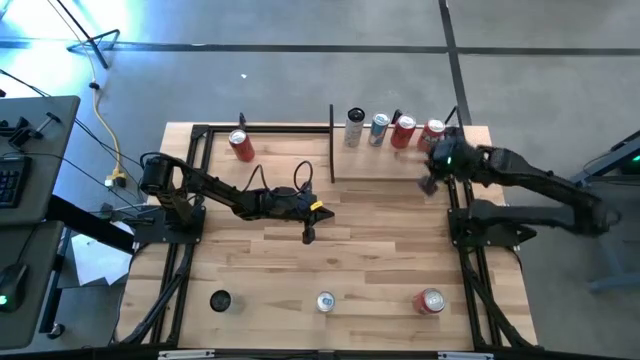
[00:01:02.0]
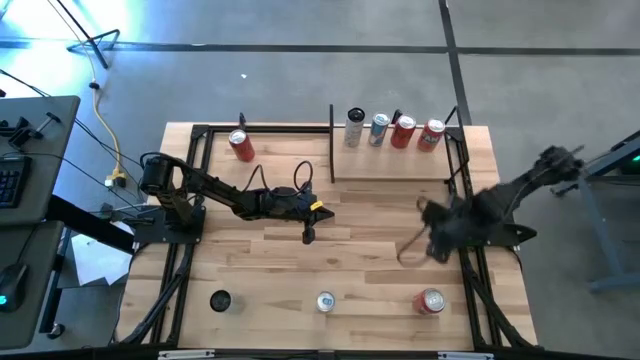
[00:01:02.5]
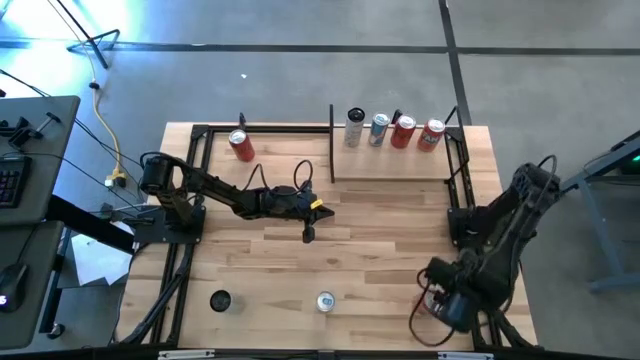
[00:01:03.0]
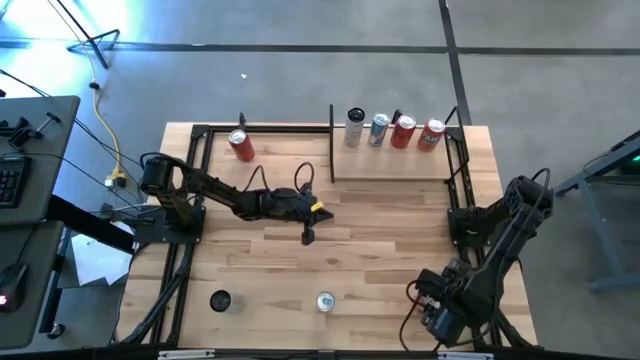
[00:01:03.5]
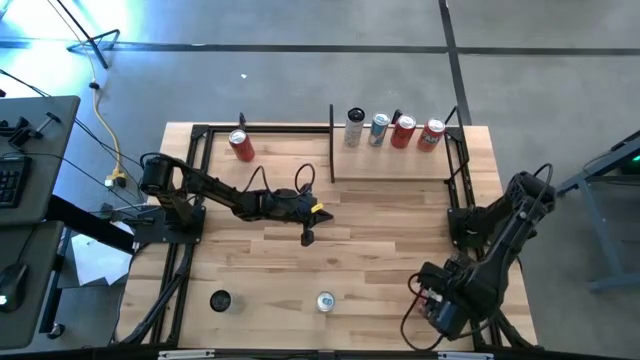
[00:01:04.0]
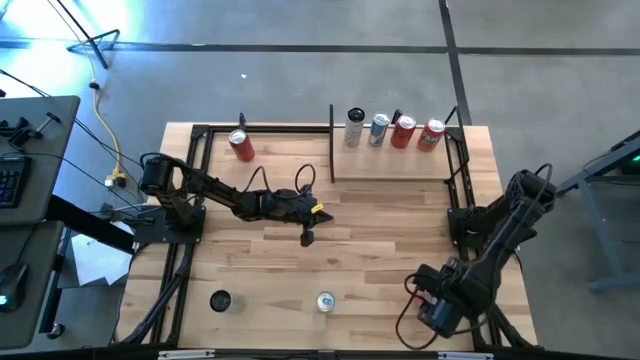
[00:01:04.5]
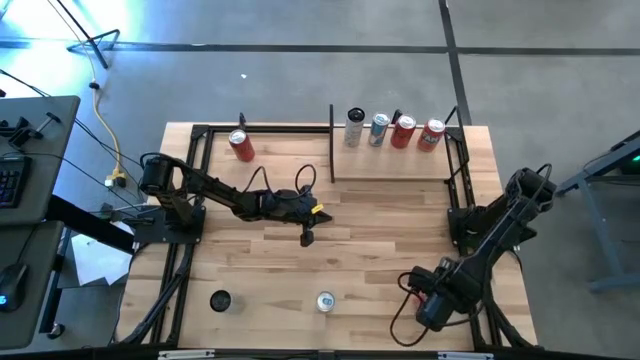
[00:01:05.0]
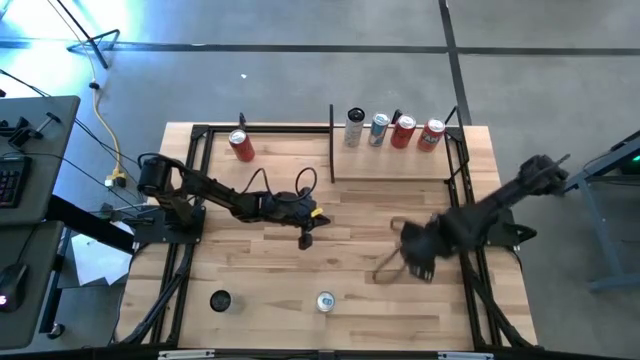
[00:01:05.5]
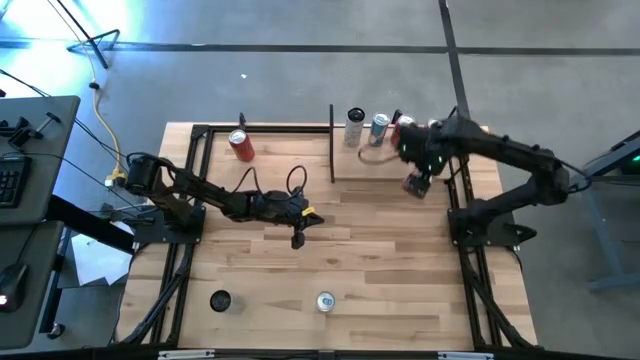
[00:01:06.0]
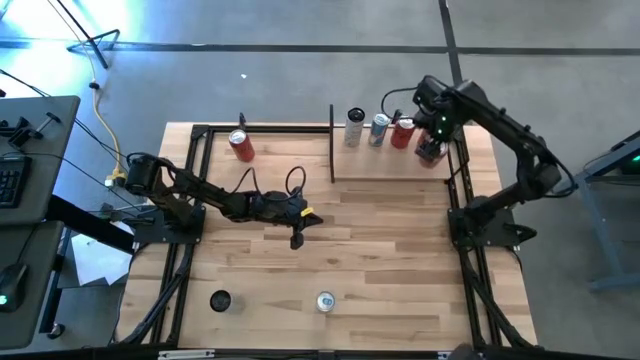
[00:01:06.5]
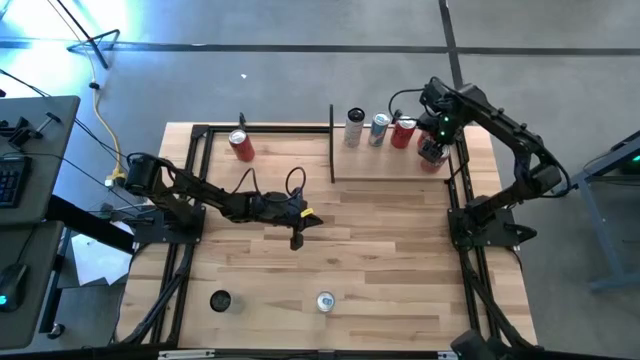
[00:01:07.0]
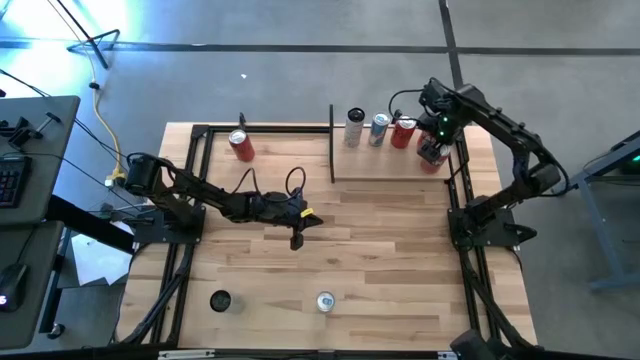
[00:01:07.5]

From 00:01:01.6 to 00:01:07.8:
Task: Place canned beverage on shelf
Put the orange soda can on the shelf and align it with the other orange soda can

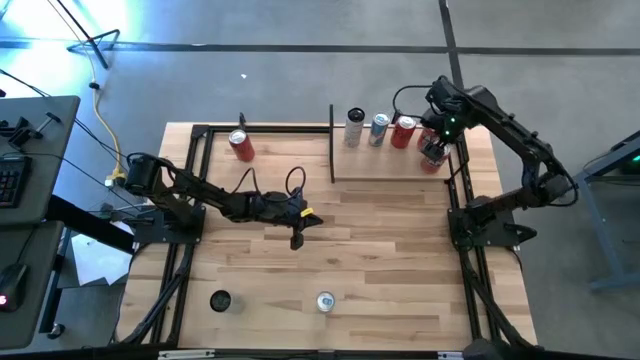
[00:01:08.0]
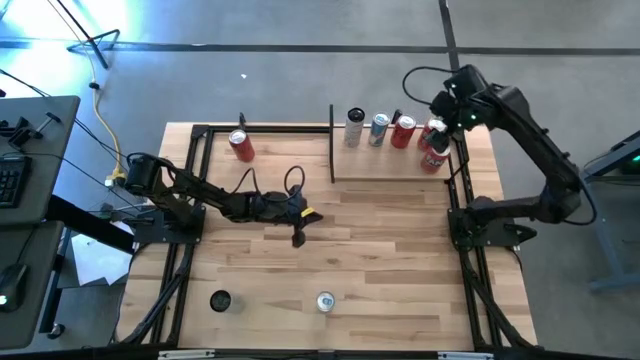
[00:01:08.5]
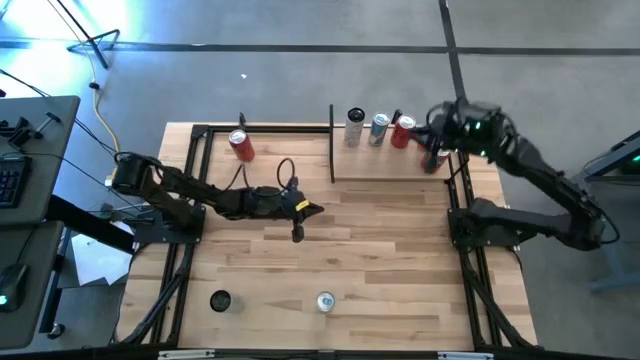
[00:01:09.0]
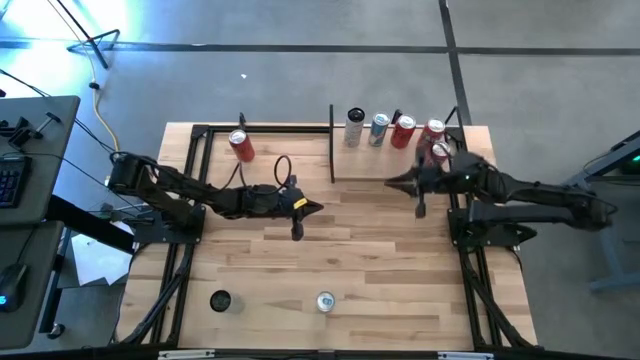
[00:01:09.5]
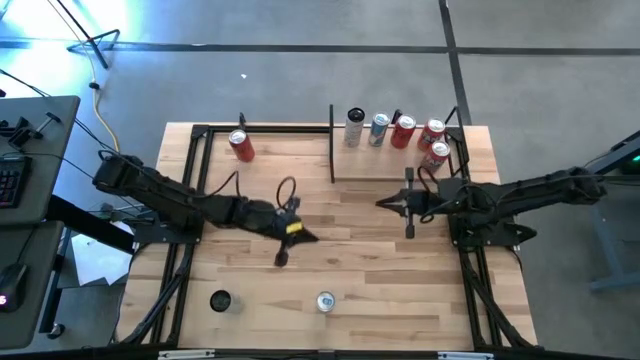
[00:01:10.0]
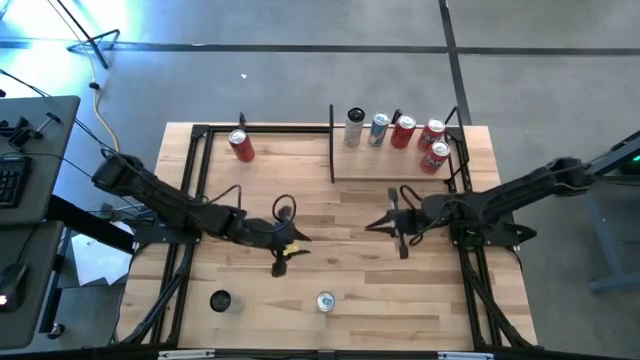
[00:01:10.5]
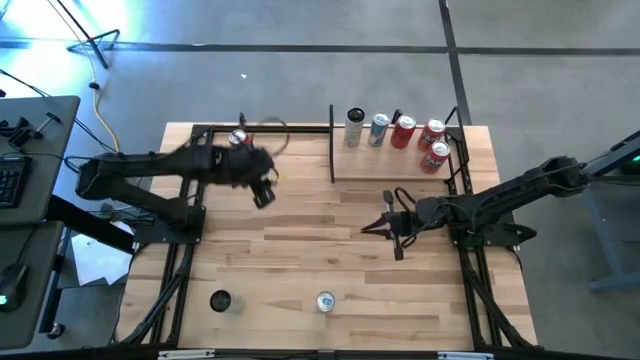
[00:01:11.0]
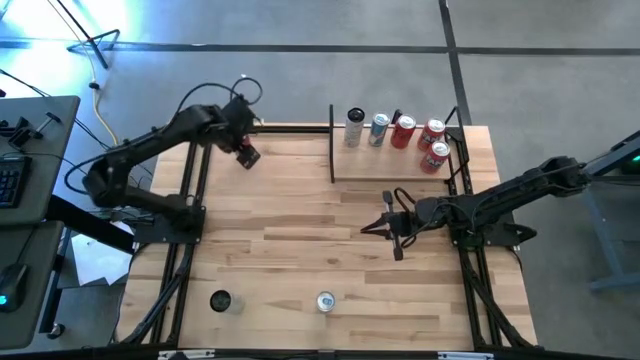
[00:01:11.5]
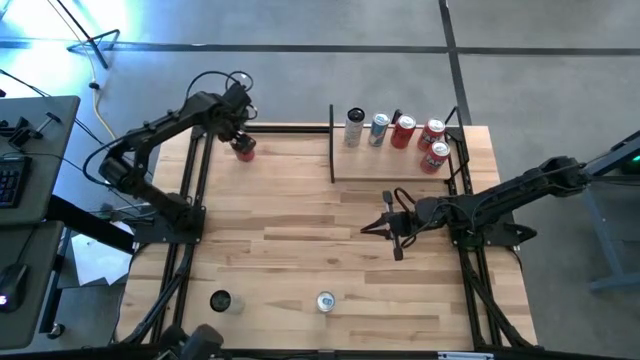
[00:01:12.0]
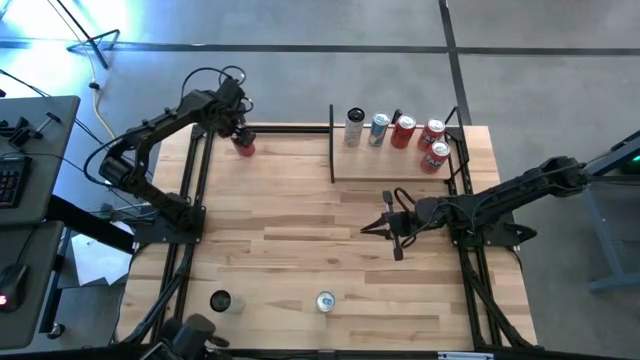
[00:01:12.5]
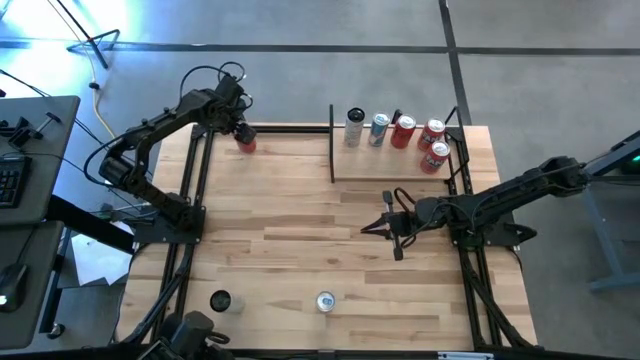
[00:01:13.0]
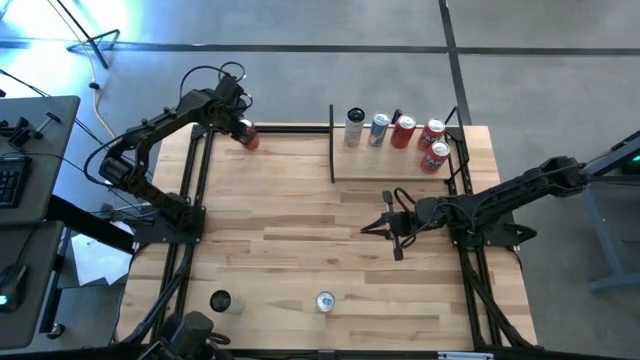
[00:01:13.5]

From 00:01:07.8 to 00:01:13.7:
Put the red soda can on the shelf and align it with the other red soda can

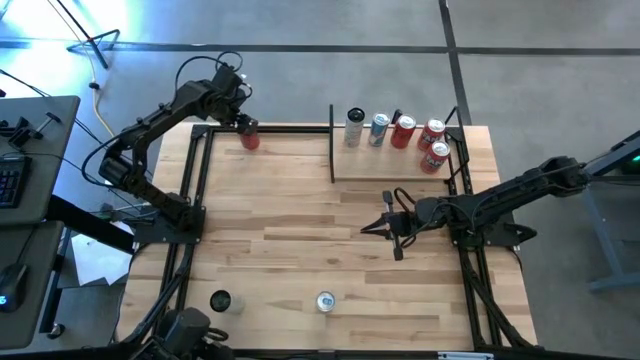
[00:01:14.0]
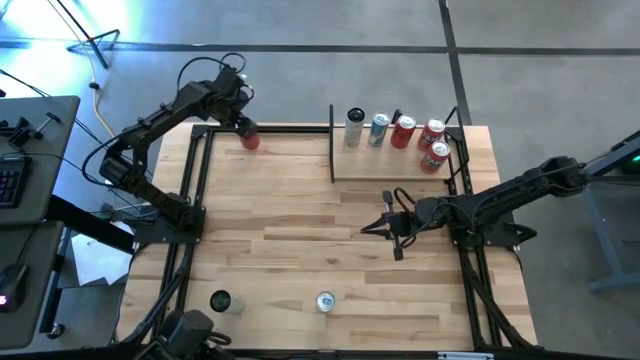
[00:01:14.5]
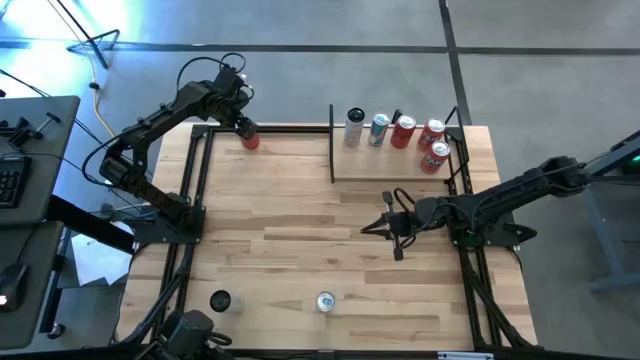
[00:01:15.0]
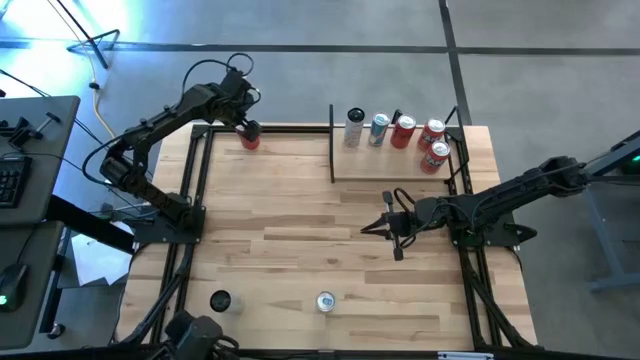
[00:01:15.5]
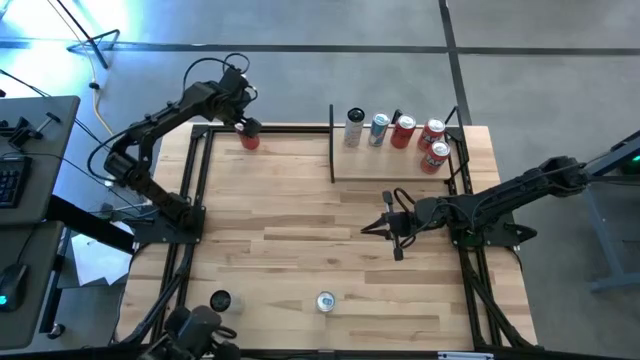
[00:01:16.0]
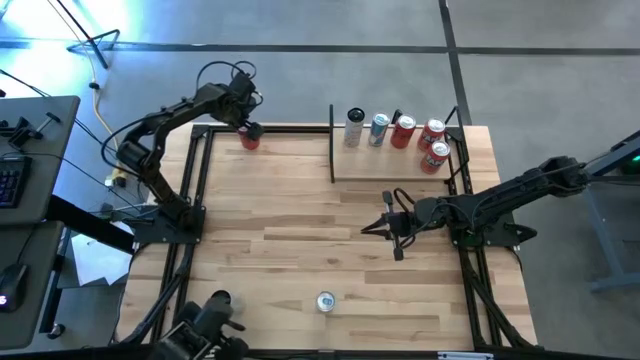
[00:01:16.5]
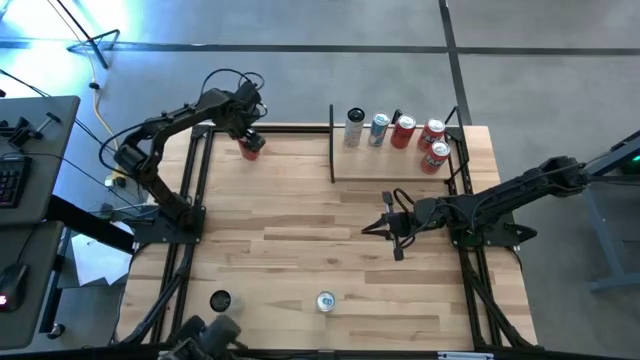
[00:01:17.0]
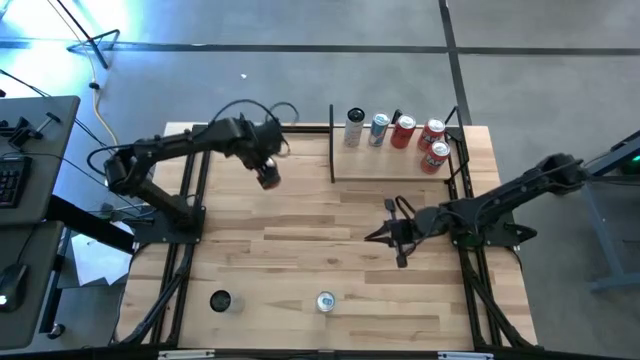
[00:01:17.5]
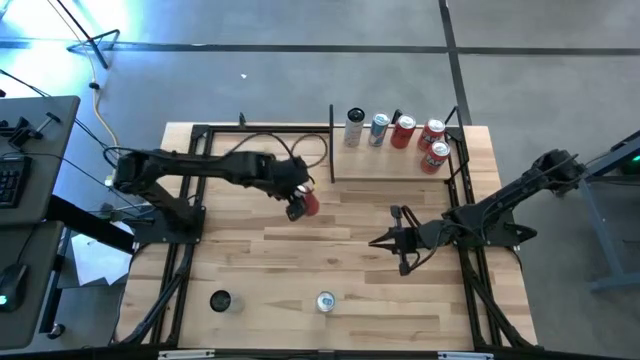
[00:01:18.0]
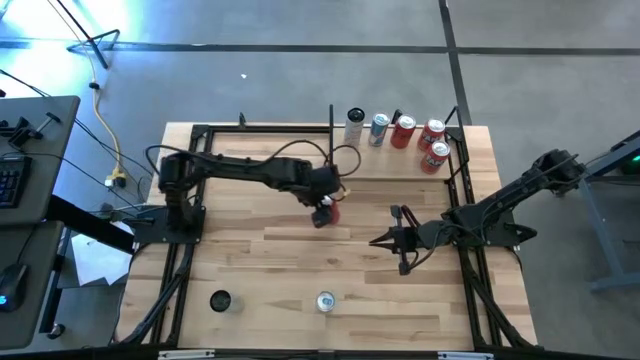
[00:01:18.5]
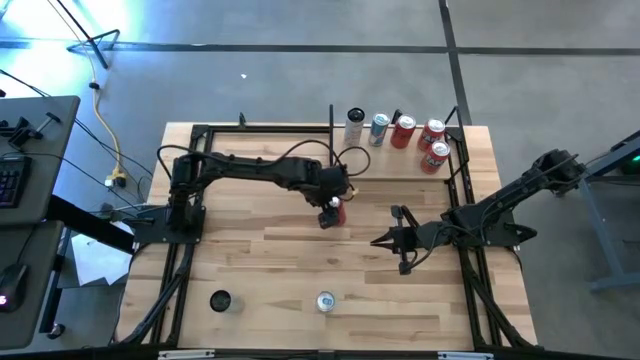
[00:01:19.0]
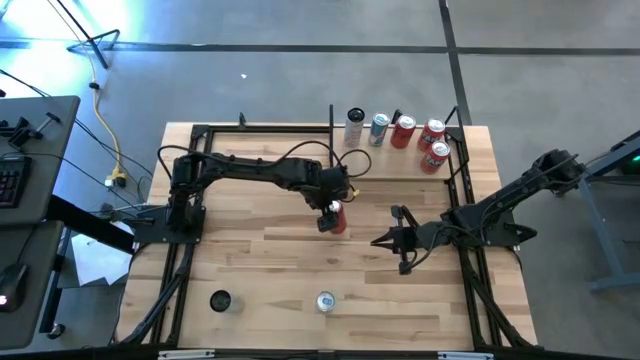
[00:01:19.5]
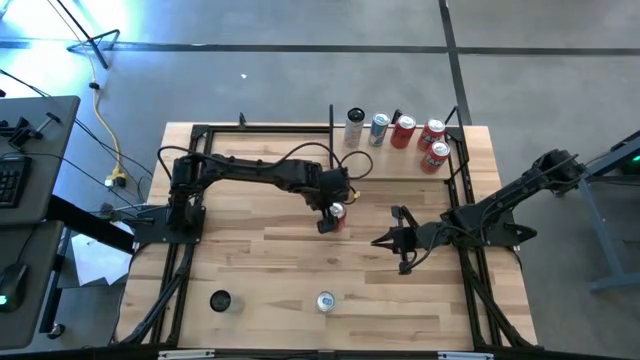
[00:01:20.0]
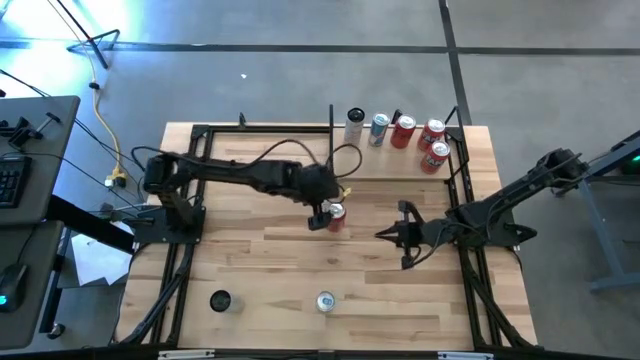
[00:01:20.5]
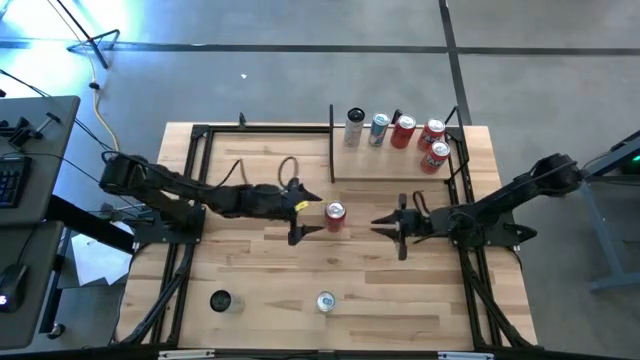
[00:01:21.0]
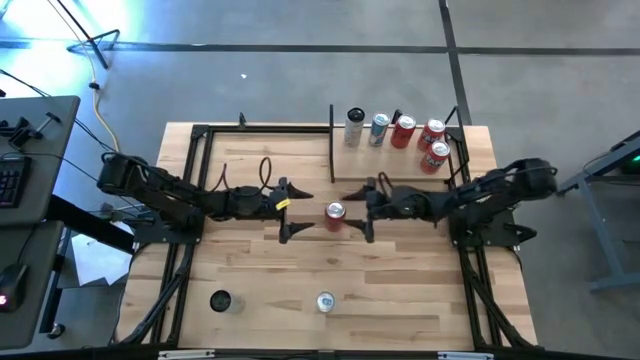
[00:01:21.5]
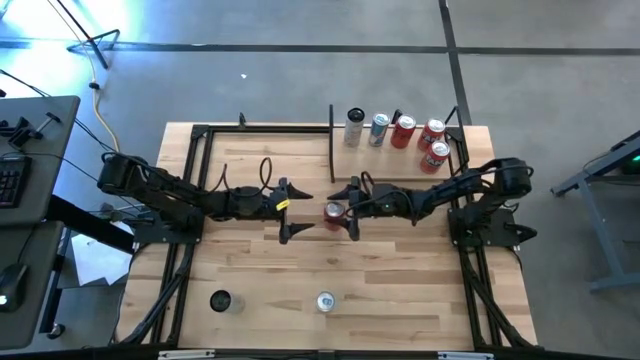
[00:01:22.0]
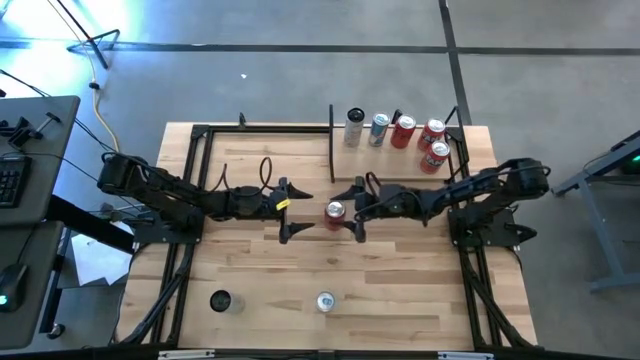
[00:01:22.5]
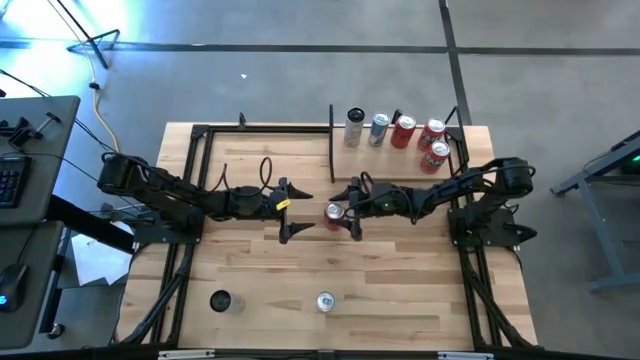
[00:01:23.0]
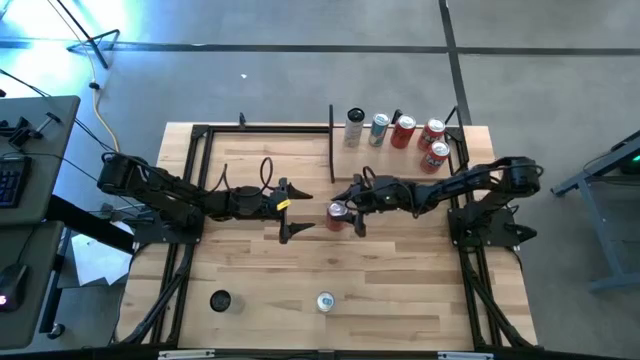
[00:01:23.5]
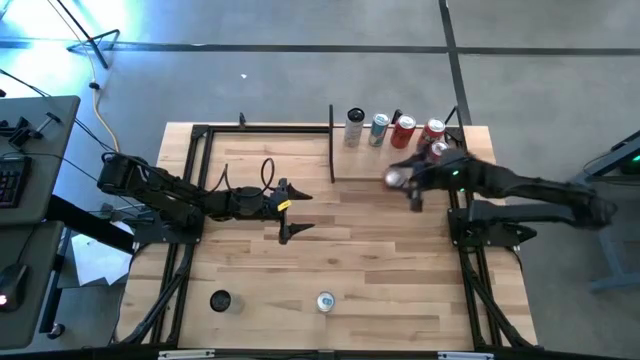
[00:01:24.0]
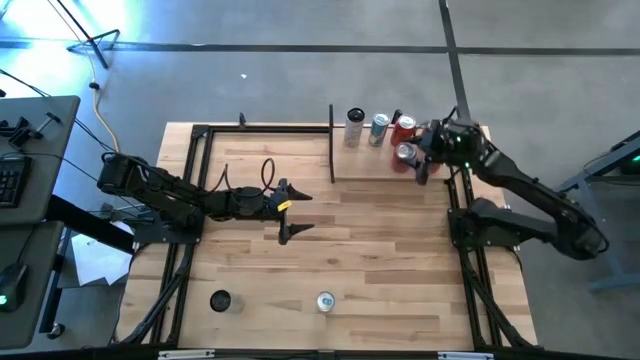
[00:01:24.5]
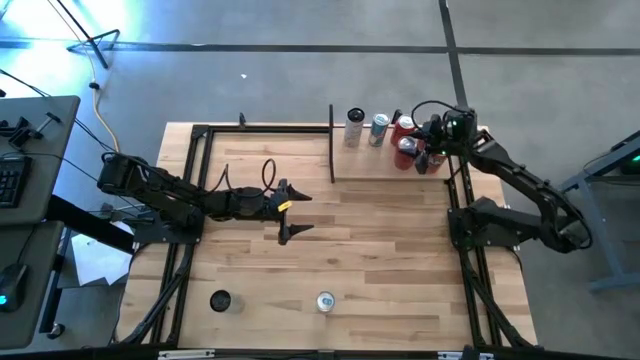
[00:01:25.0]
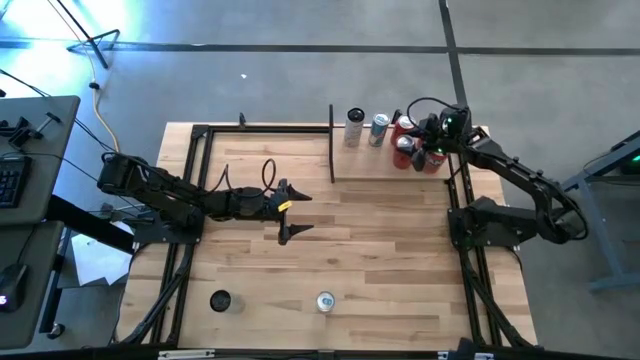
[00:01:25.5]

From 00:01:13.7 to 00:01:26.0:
Put the red soda can on the shelf and align it with the other red soda can
